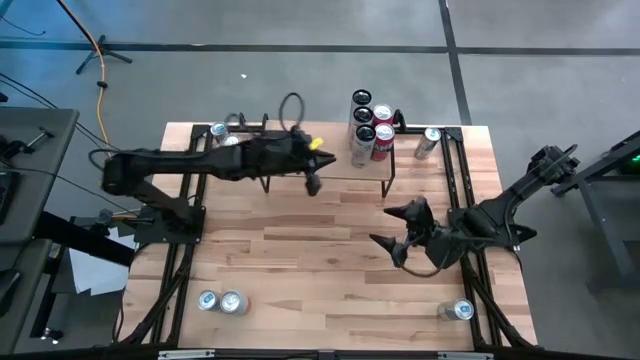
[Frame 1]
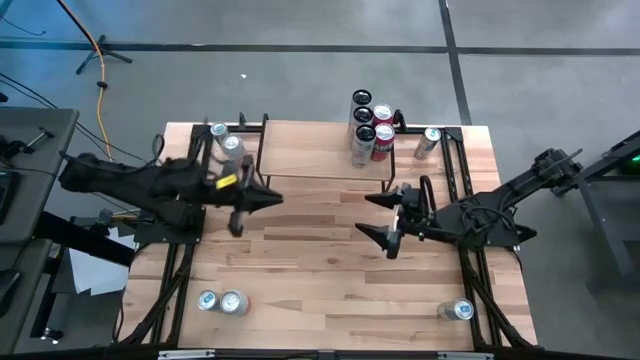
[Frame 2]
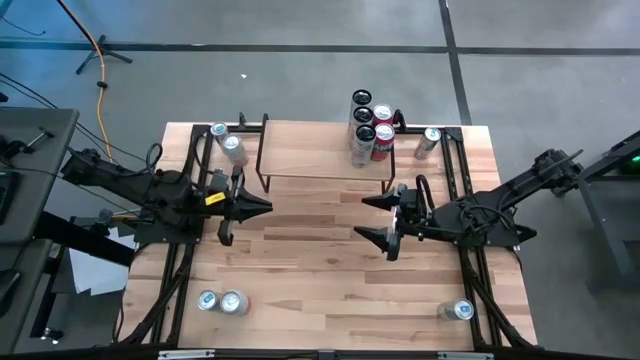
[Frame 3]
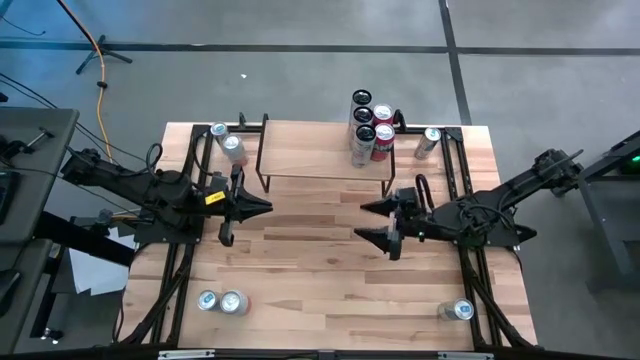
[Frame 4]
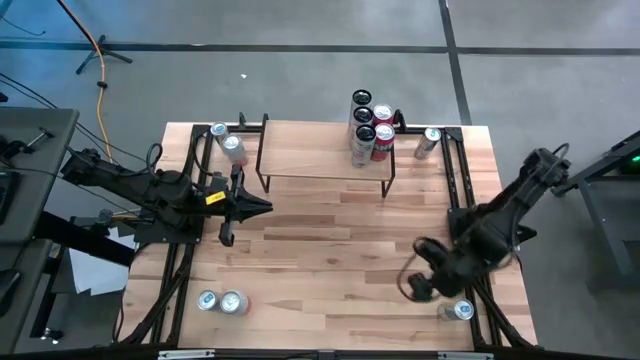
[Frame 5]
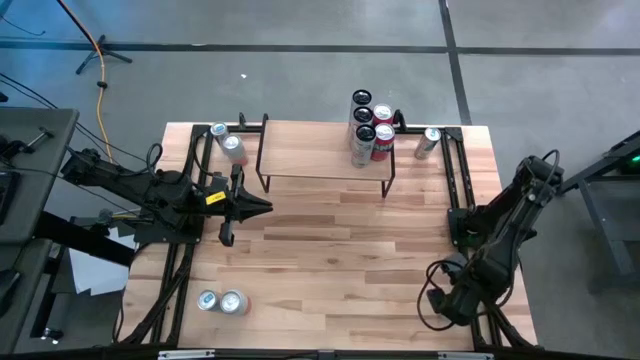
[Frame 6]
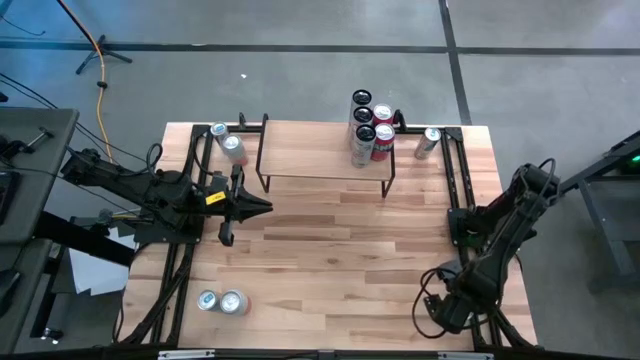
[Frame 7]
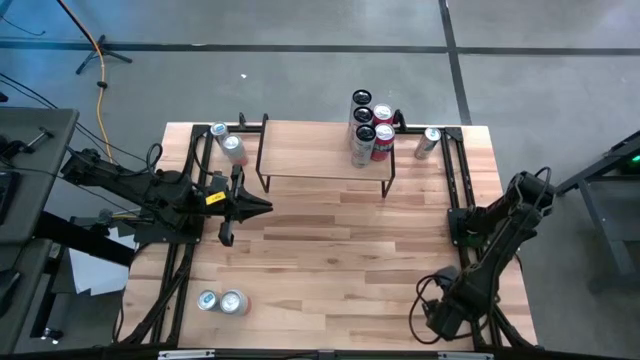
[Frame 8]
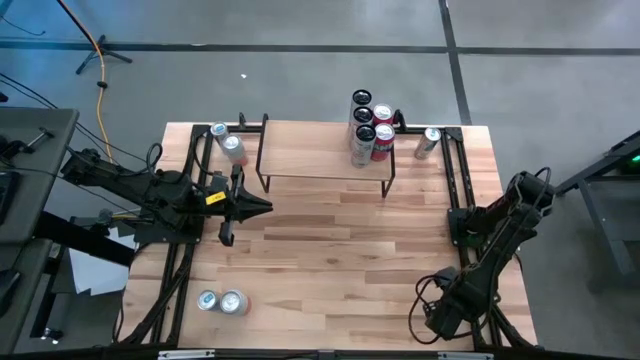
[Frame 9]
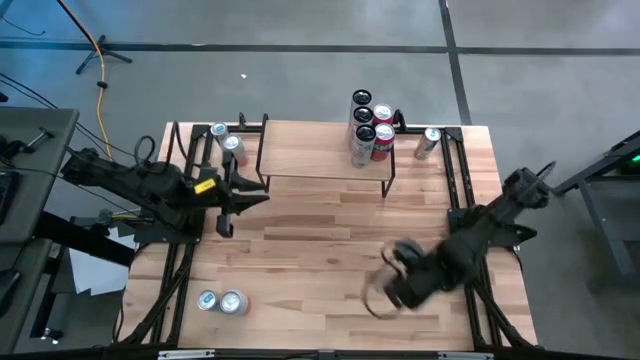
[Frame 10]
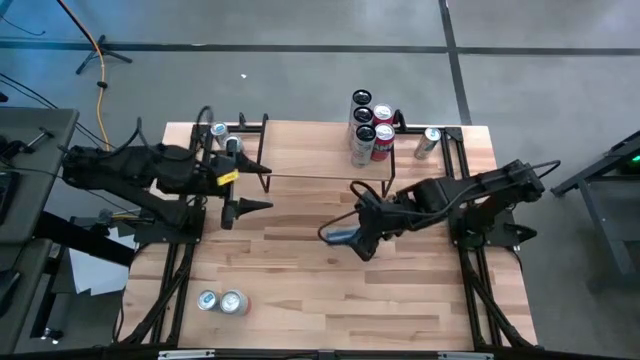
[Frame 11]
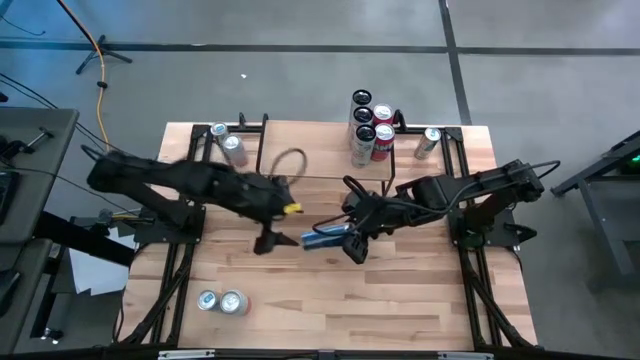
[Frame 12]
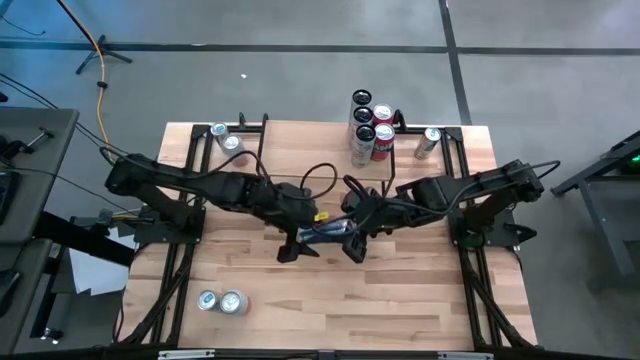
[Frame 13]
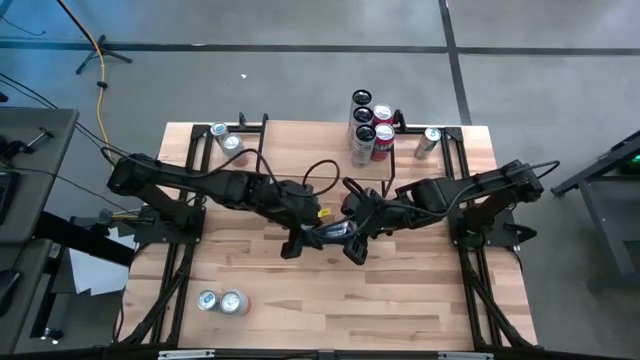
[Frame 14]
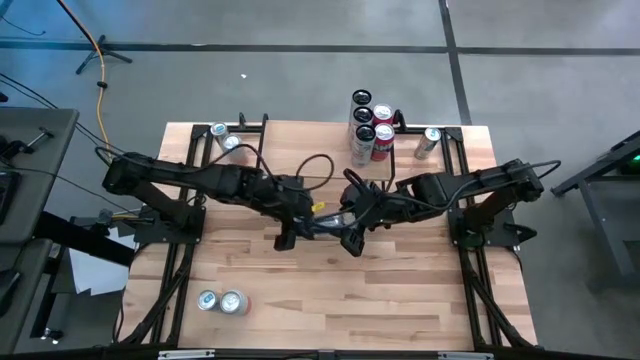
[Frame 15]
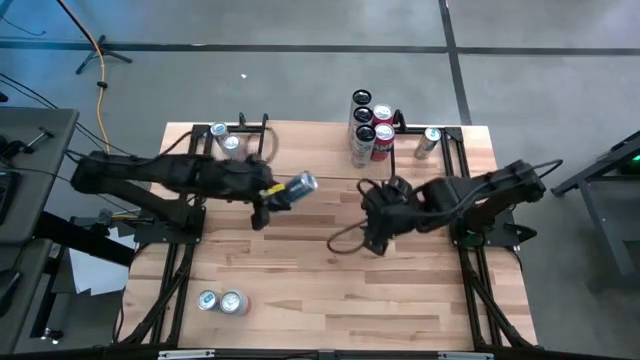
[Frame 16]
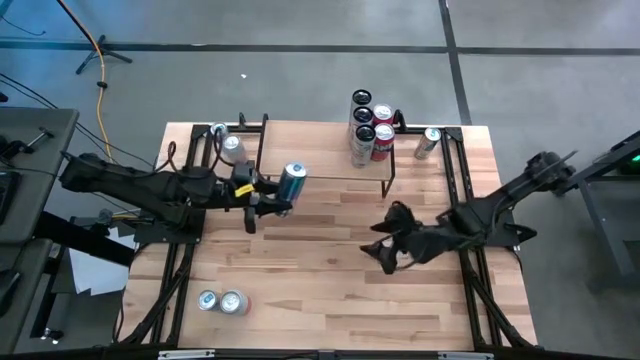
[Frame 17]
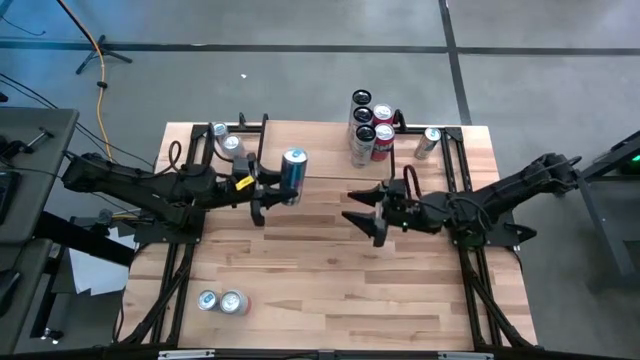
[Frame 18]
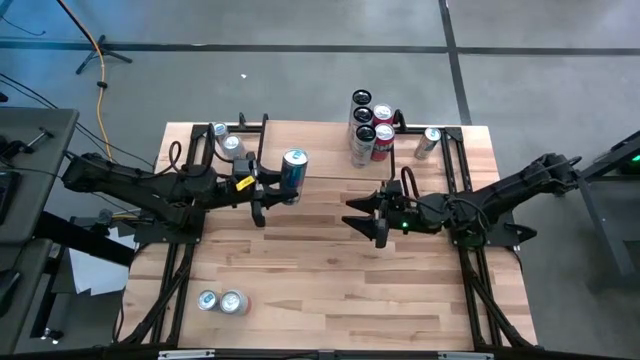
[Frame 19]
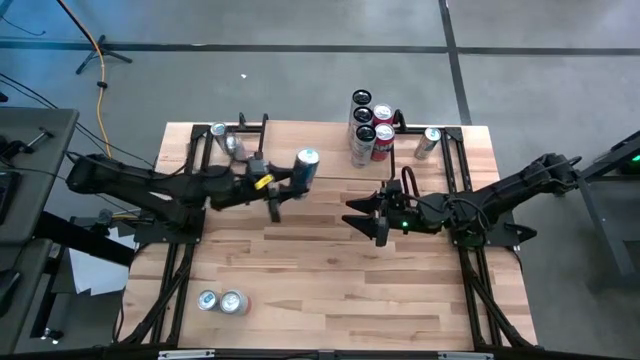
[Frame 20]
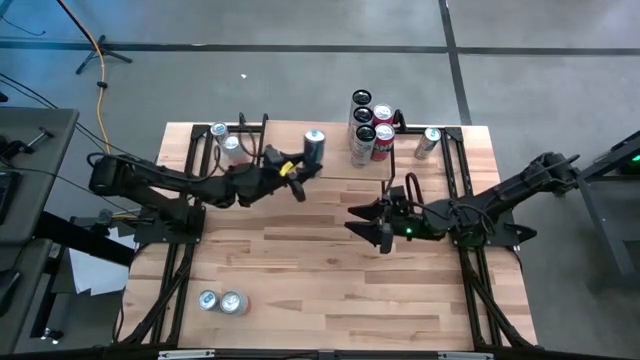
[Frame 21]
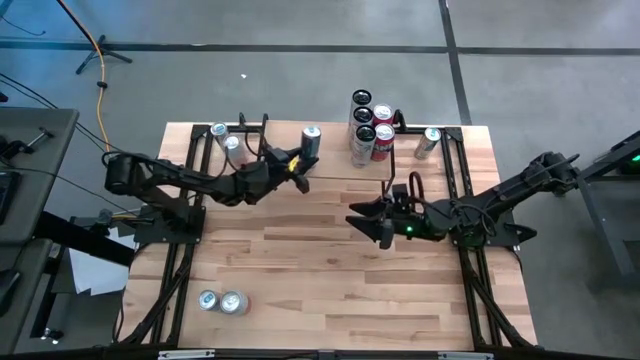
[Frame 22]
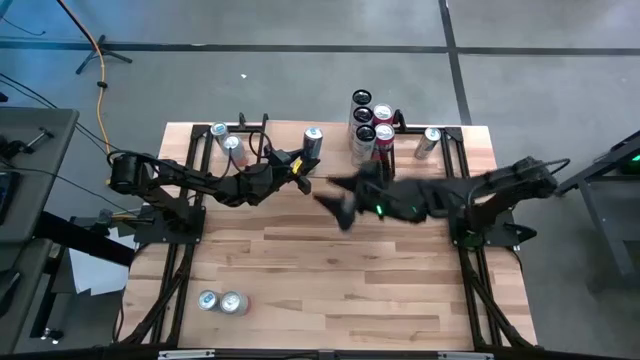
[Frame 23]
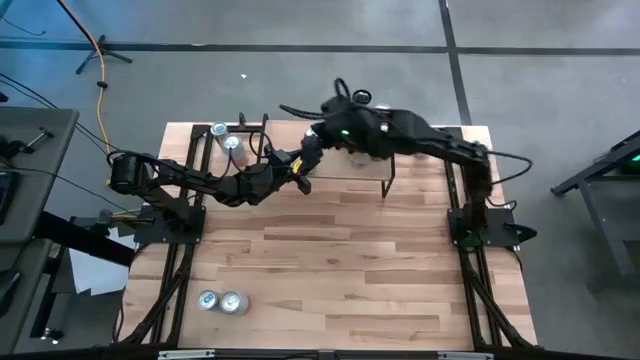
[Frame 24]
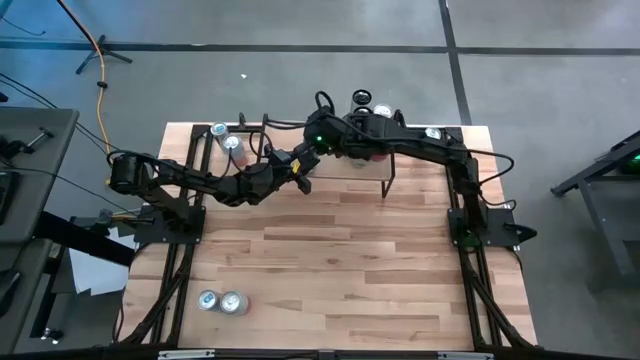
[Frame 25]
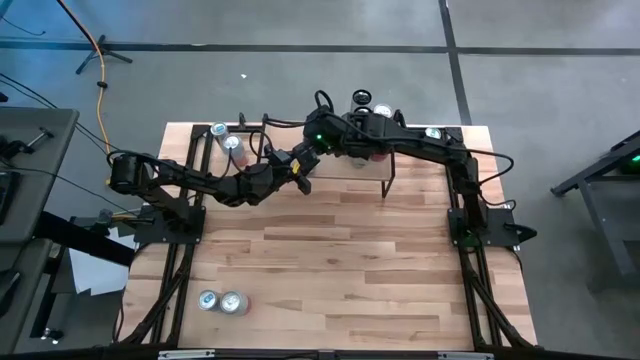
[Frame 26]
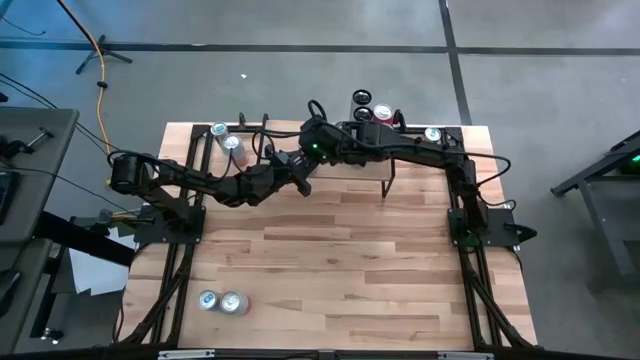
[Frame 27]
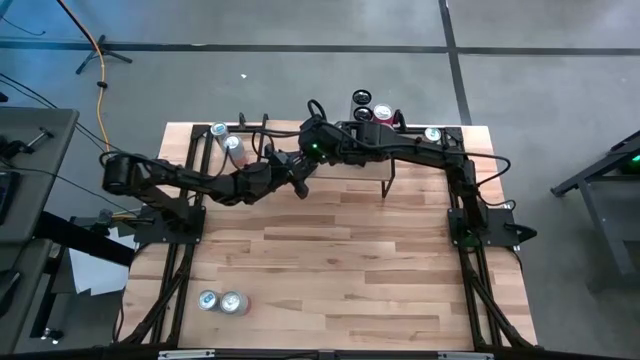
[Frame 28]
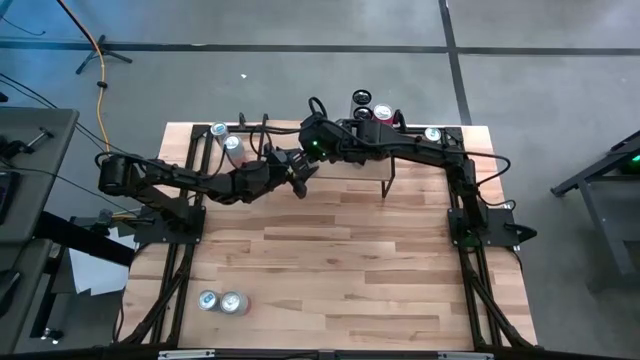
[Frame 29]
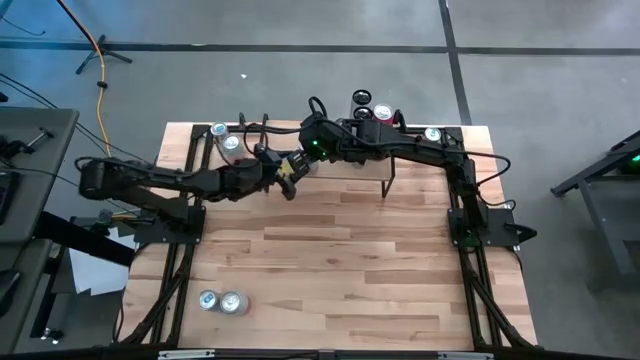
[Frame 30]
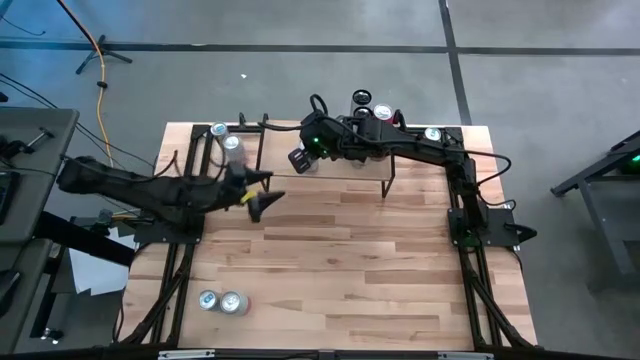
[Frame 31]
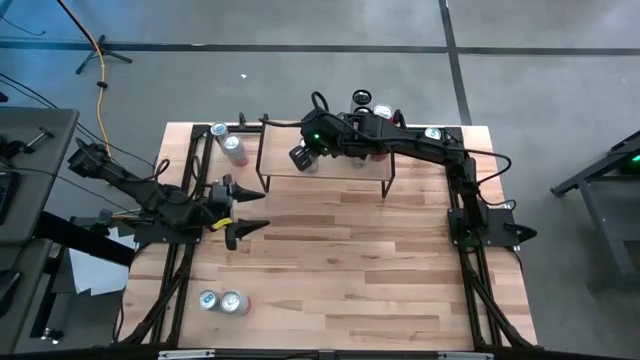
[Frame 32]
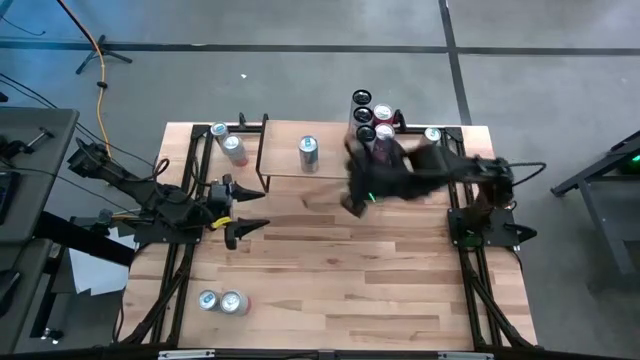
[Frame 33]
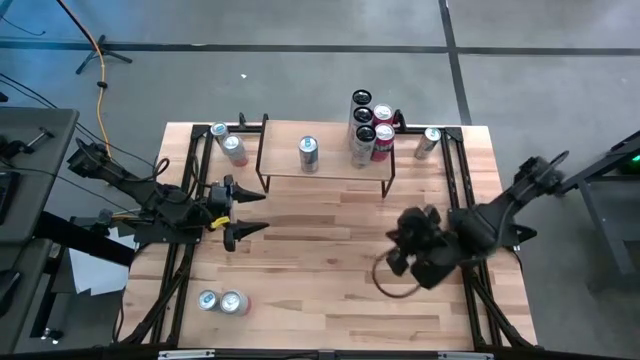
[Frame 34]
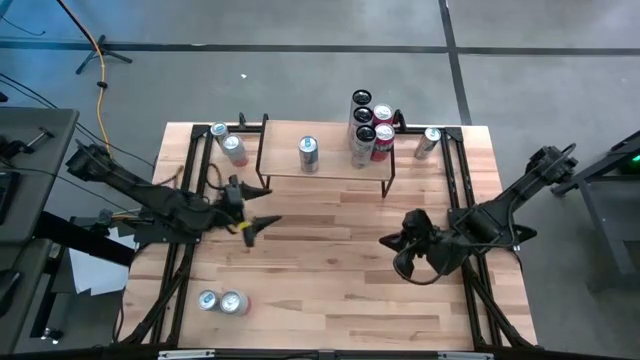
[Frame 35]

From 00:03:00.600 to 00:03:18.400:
Task: Place canned beverage on shelf
Put the bottom right blue soda can on the shelf

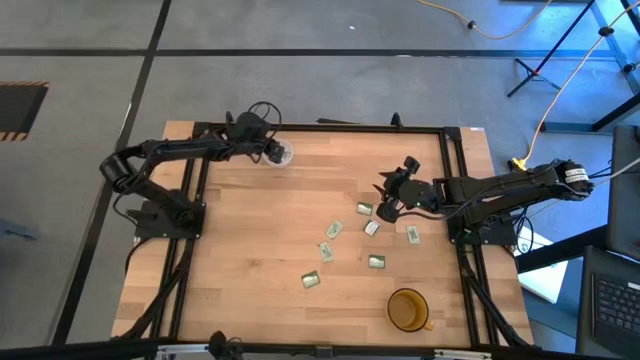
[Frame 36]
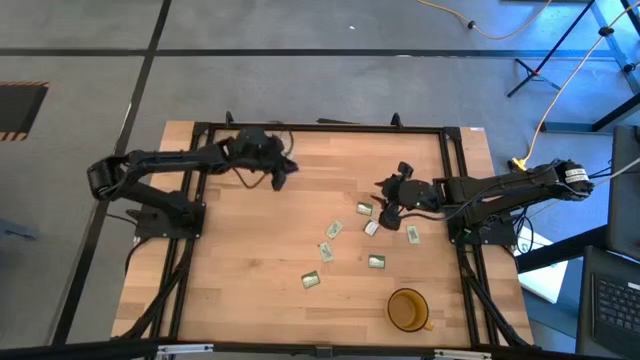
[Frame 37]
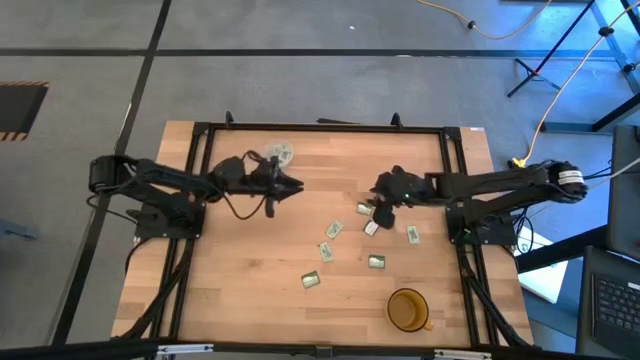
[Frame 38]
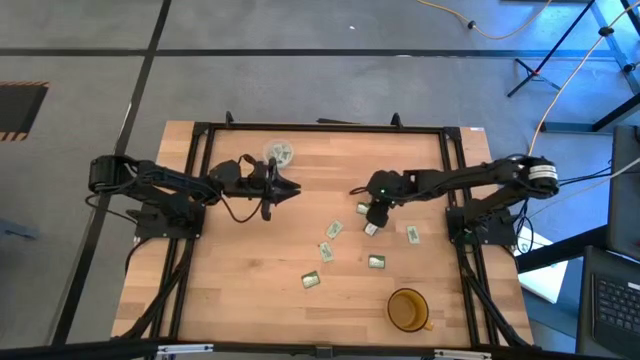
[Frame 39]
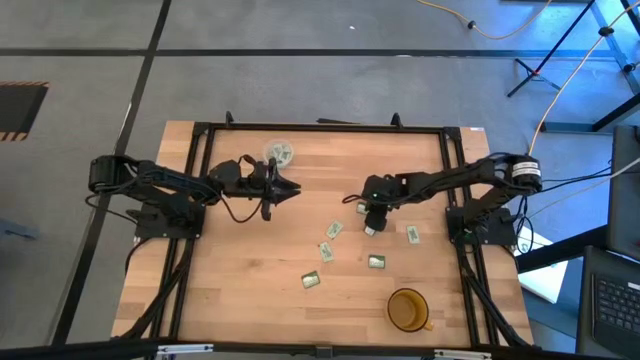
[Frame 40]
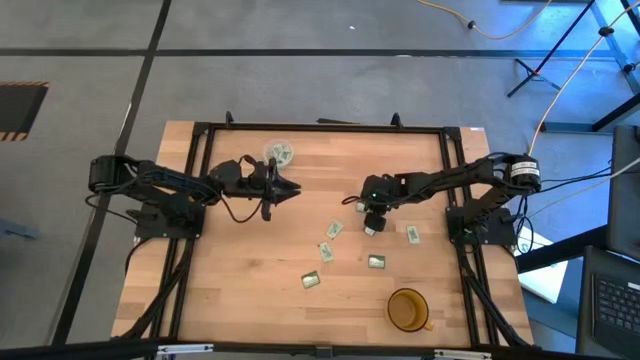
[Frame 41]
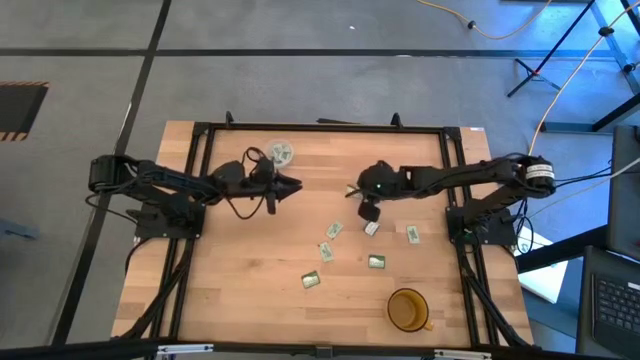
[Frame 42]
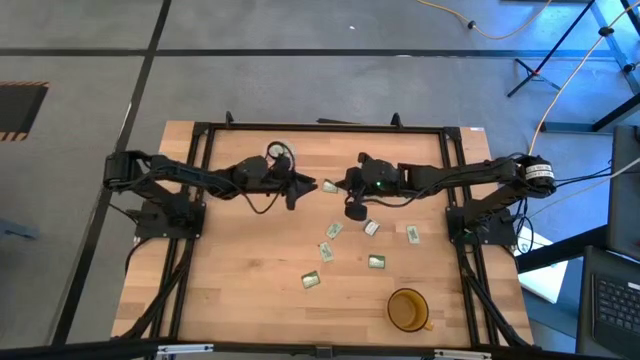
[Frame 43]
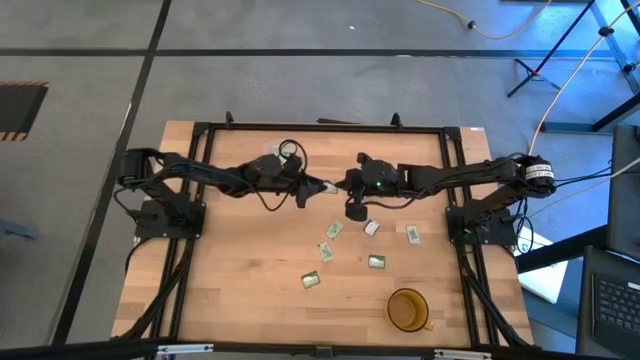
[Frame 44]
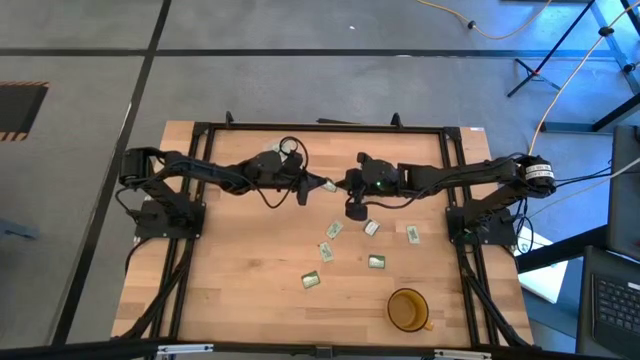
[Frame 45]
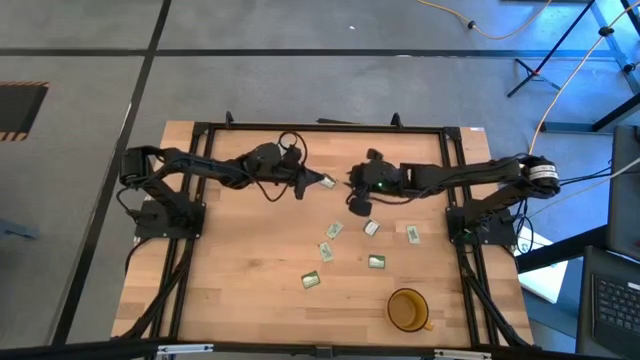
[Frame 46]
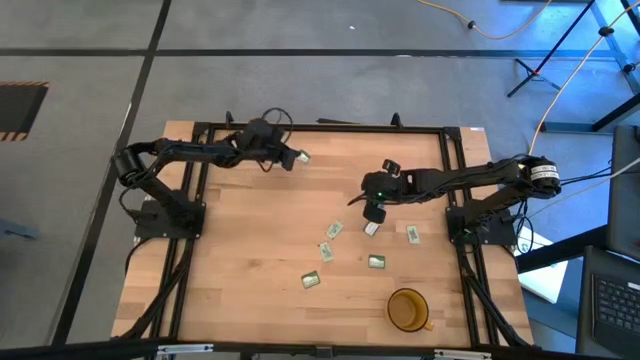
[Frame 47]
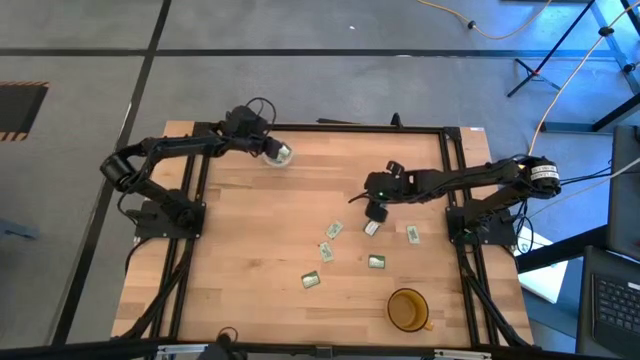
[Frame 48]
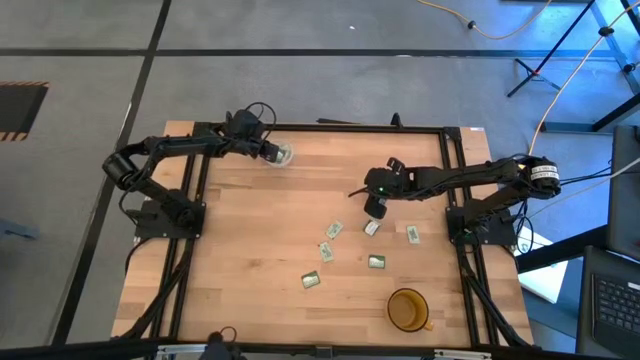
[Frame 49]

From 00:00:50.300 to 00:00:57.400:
Task: Pick and place Stevia / Truvia into bins
Put the truvia packet into the transparent container
